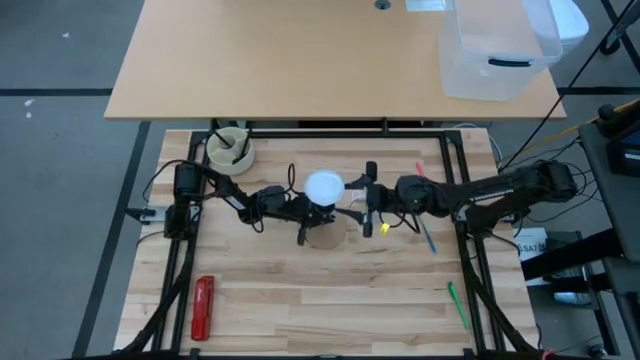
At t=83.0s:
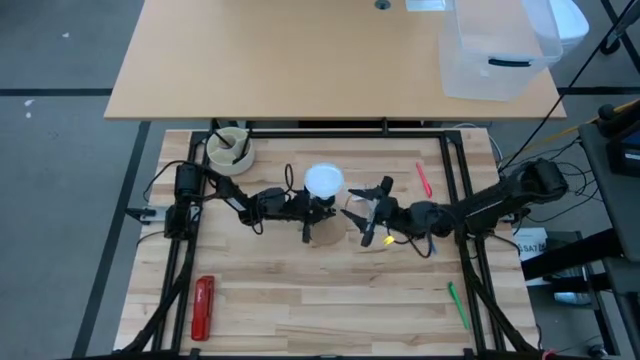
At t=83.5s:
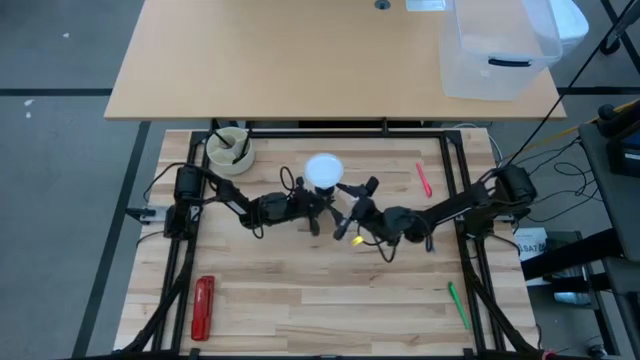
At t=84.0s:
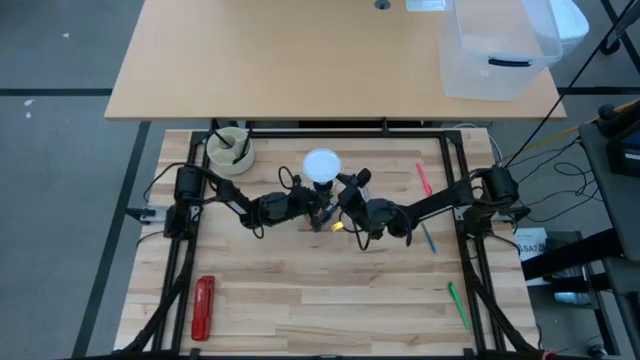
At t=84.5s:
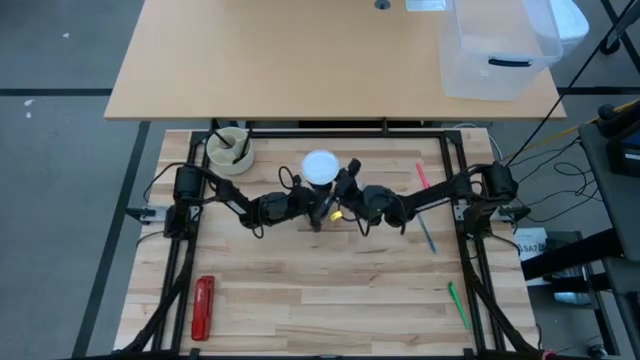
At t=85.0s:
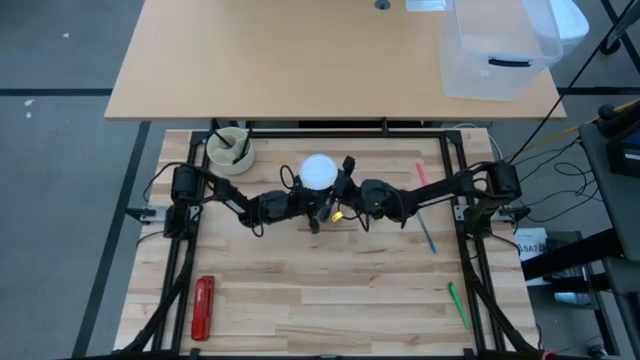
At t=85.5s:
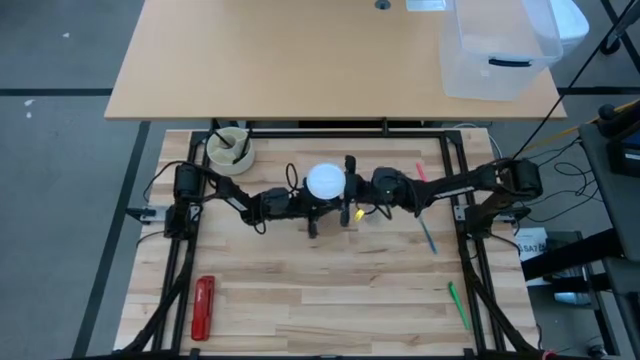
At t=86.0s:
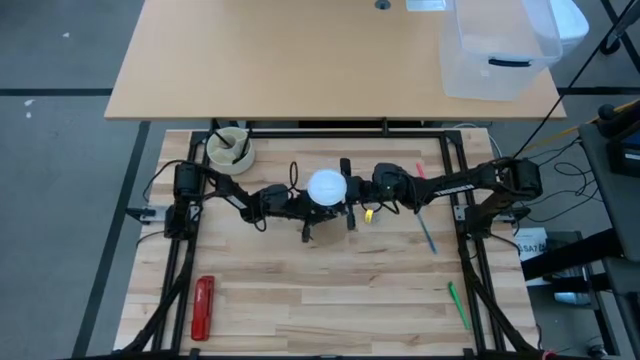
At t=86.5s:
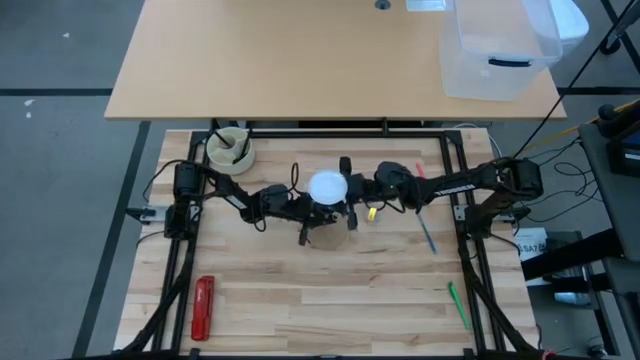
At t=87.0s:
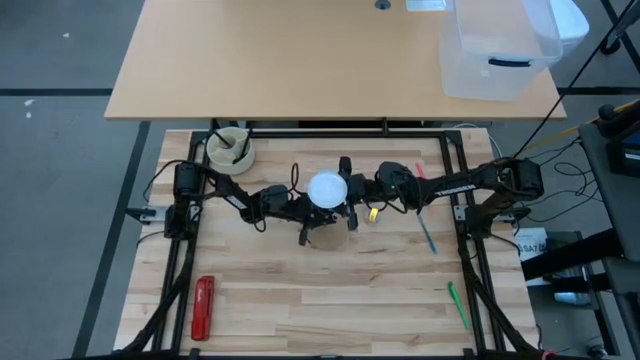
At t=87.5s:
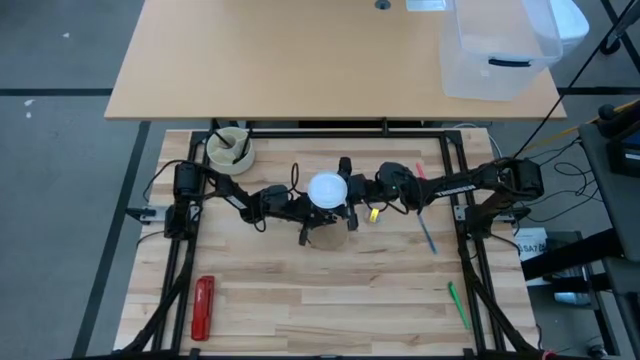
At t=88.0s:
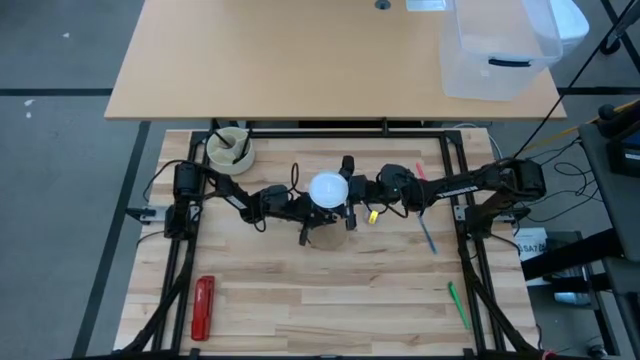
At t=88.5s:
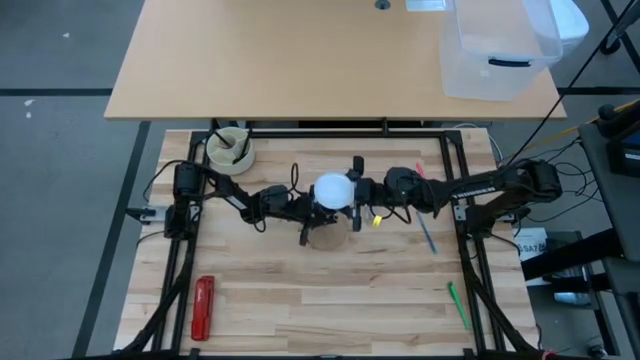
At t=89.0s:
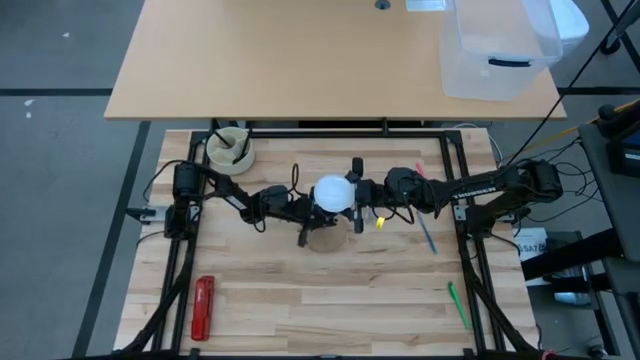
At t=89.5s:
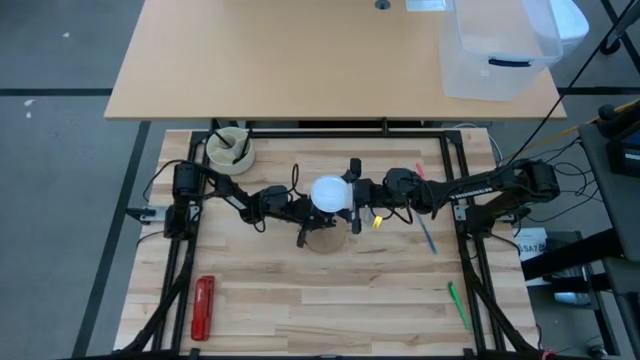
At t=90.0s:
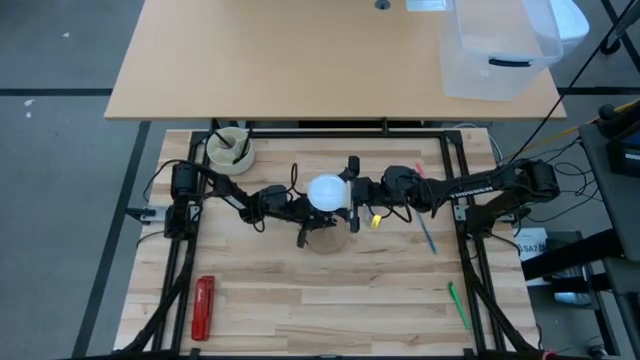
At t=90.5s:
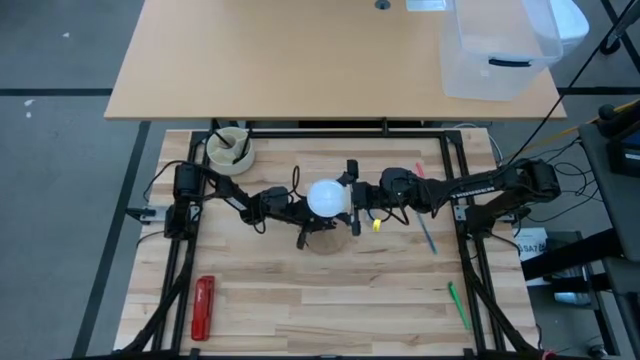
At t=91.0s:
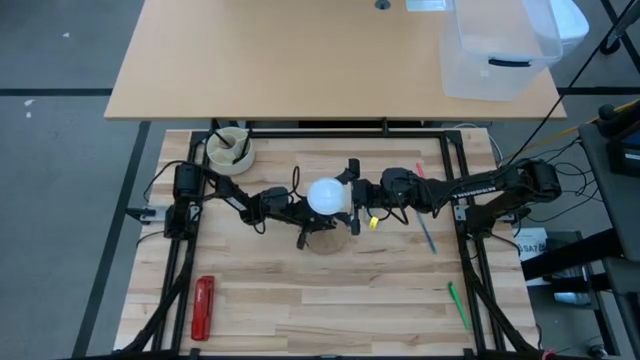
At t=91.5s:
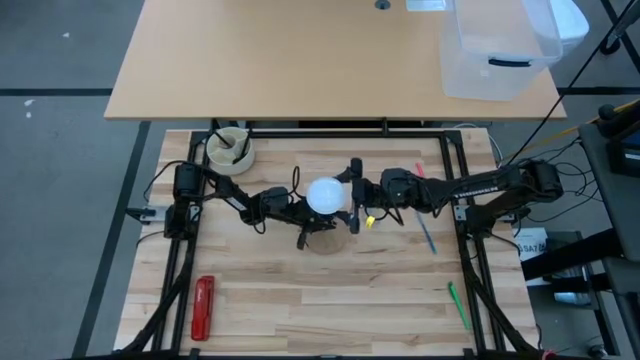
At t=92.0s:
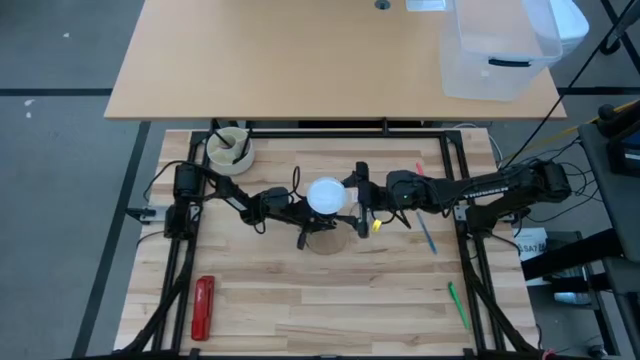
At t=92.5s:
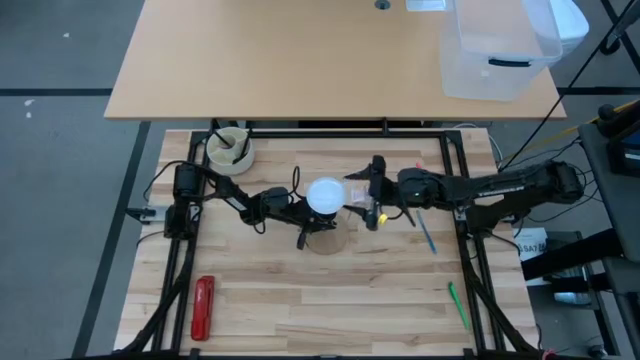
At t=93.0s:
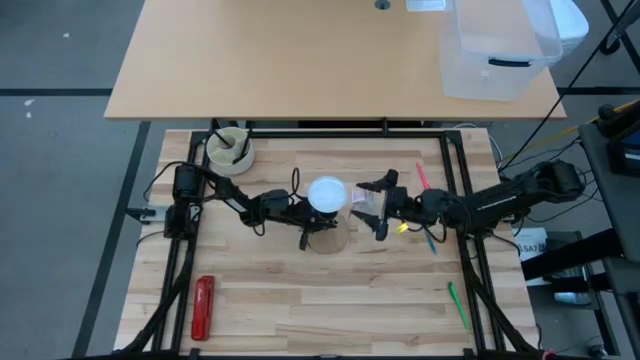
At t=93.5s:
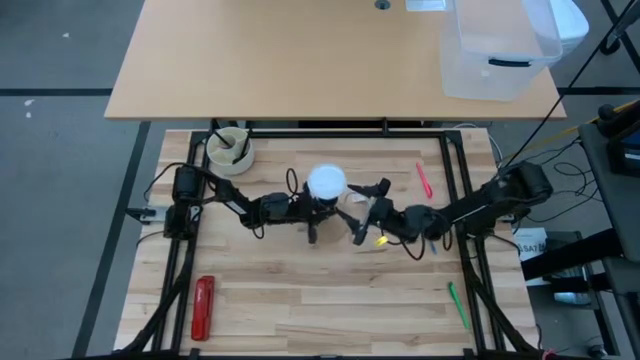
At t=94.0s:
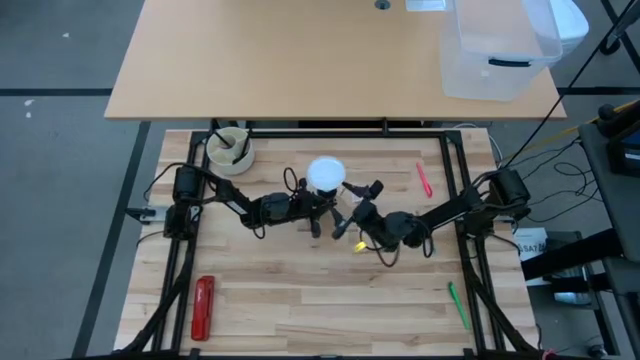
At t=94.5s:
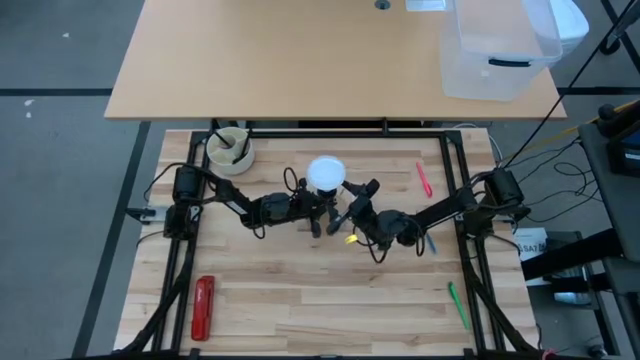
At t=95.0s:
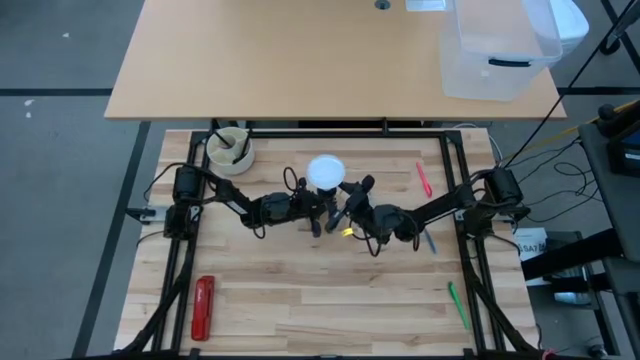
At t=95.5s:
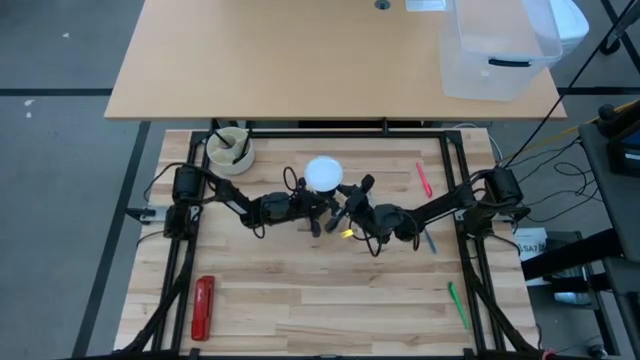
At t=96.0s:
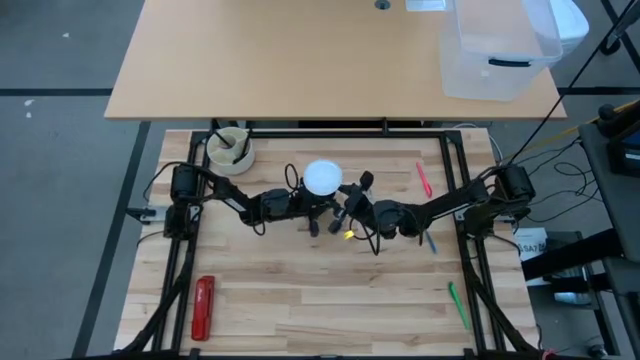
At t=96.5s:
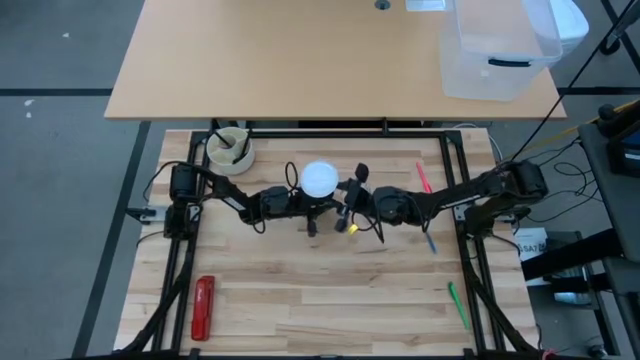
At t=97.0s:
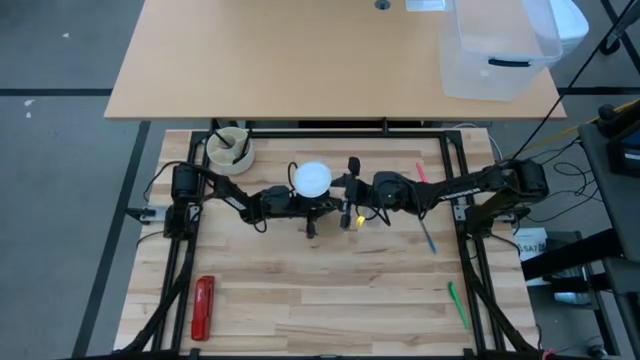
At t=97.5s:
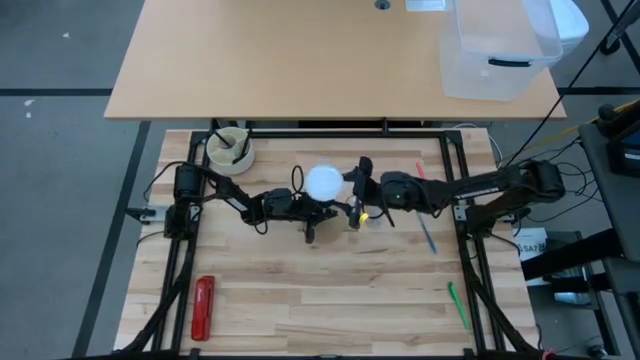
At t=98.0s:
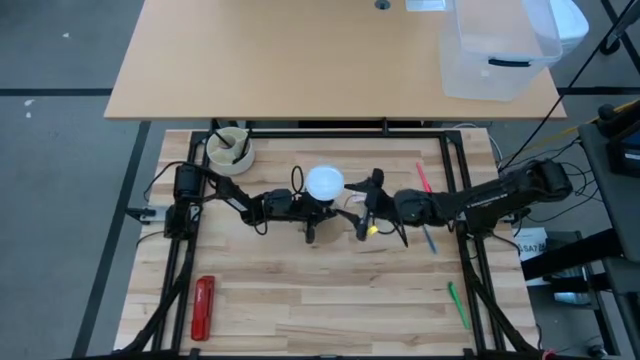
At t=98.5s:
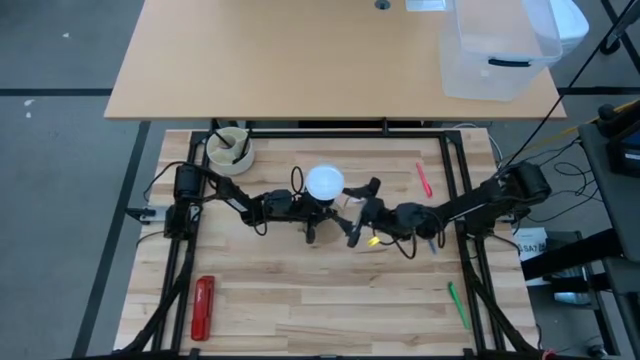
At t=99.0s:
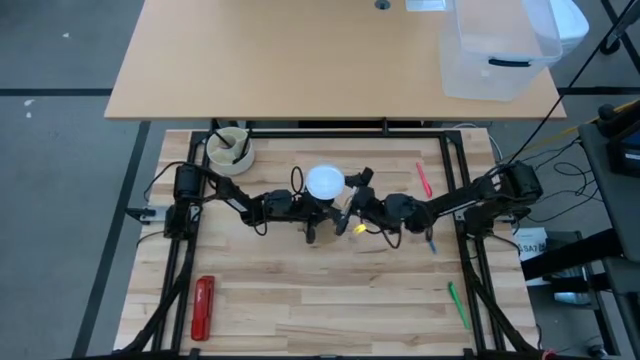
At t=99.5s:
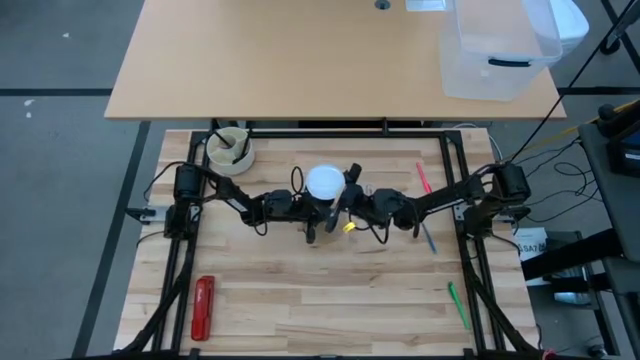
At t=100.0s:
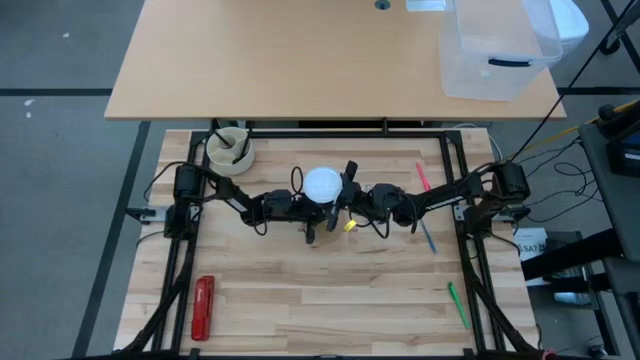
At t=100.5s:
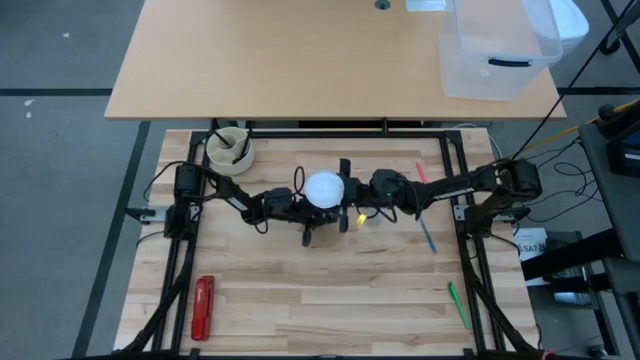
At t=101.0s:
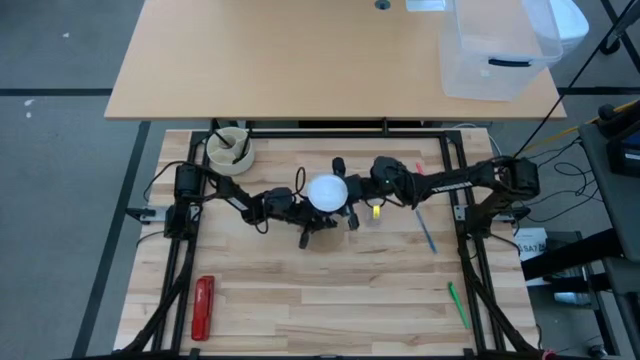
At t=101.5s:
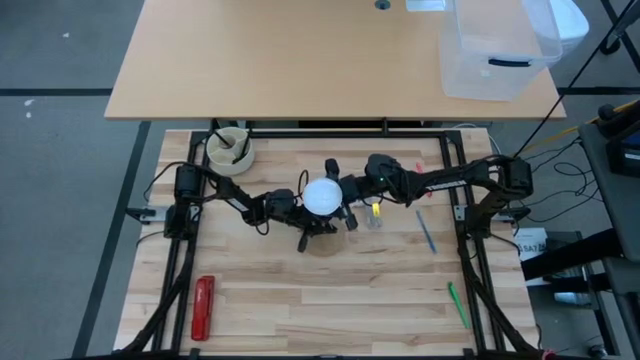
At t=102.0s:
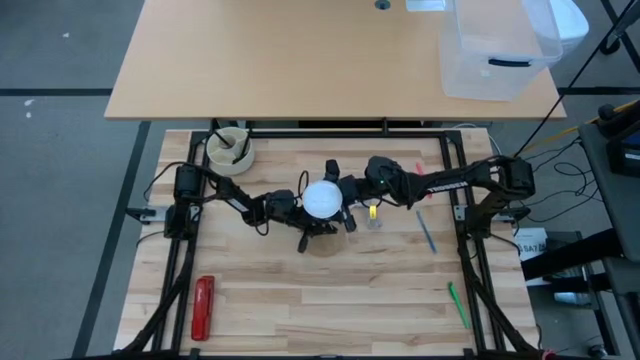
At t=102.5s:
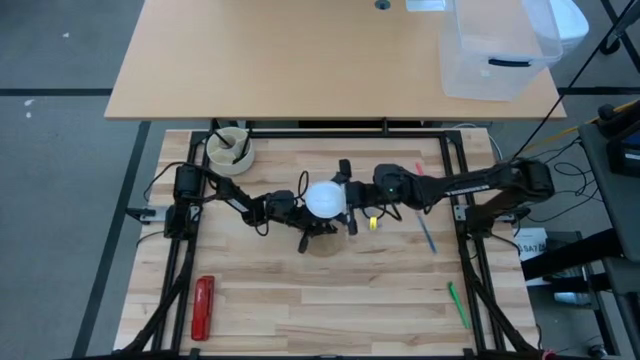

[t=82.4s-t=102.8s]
Task: Screw lightbulb
Remove the lightbulb from the desk lamp

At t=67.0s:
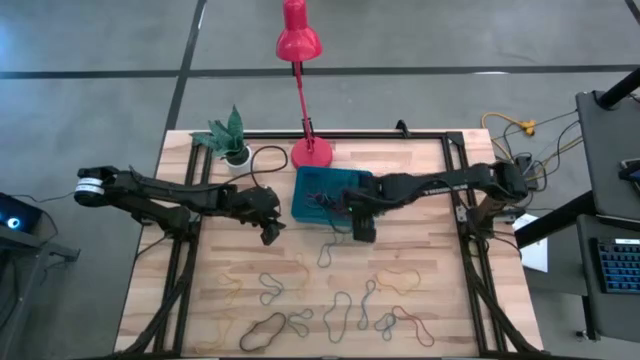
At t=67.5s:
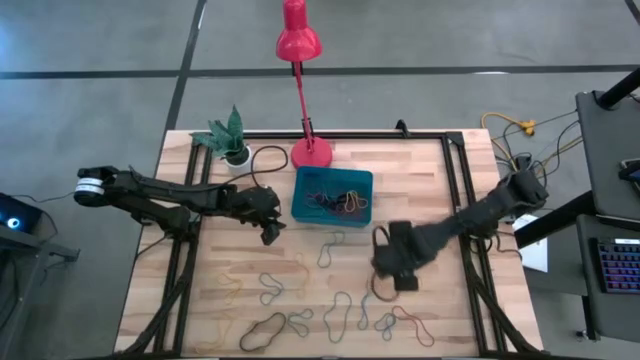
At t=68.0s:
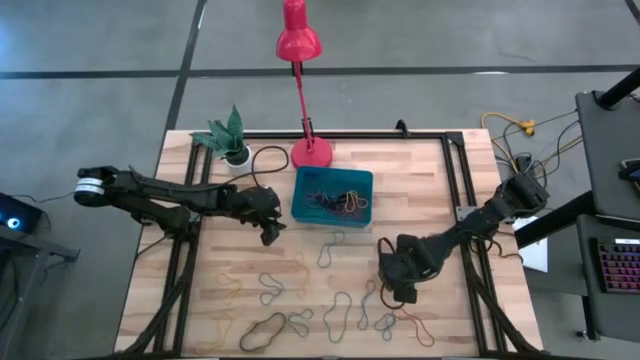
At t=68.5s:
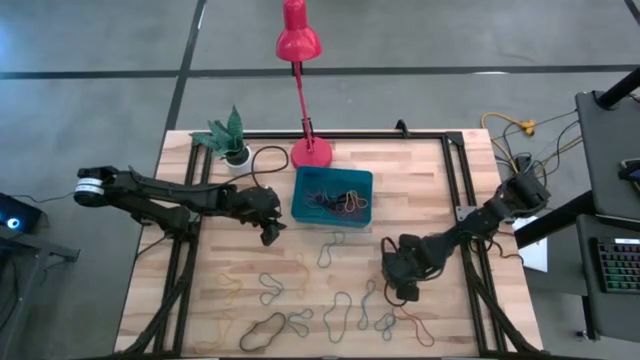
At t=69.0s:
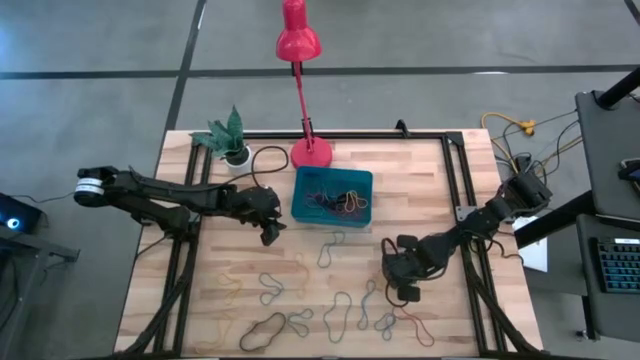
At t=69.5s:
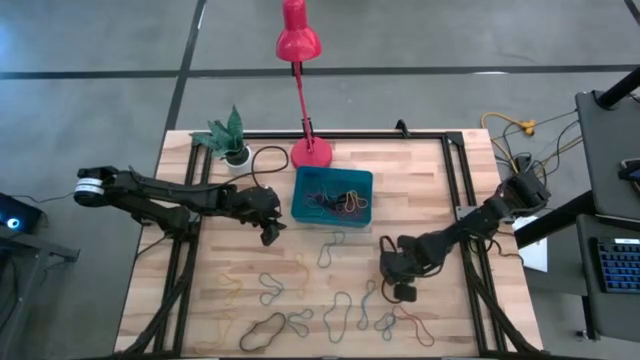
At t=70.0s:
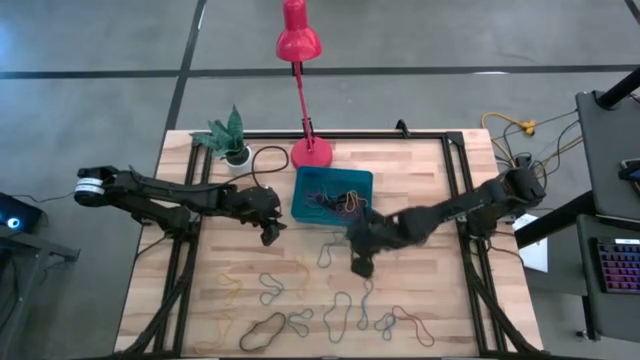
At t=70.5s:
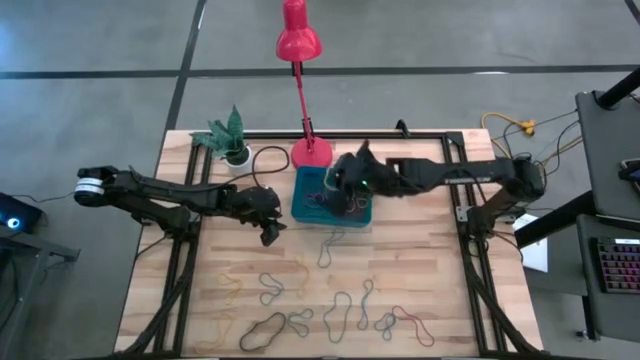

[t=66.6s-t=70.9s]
Task: Pick and place rubber bands into bin
Put the yellow rubber band into the blue bin
